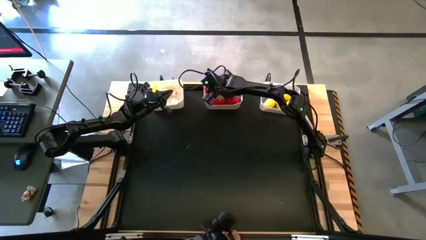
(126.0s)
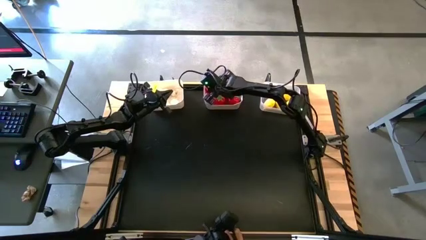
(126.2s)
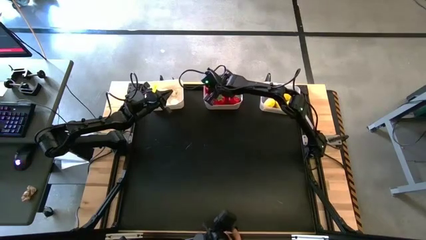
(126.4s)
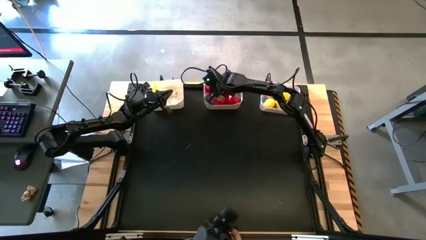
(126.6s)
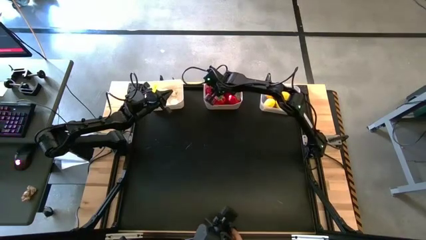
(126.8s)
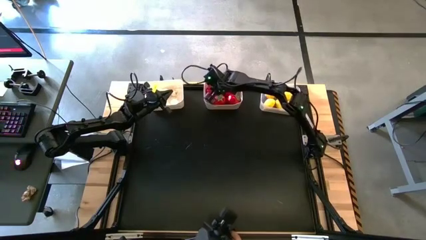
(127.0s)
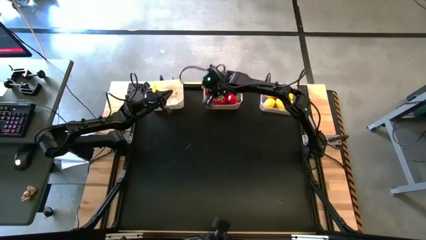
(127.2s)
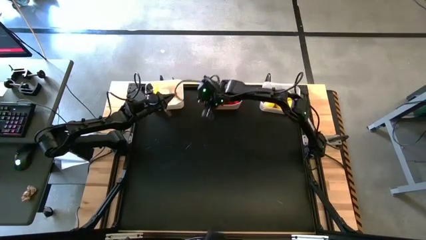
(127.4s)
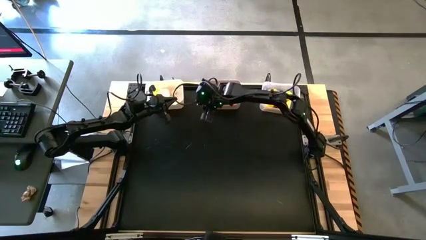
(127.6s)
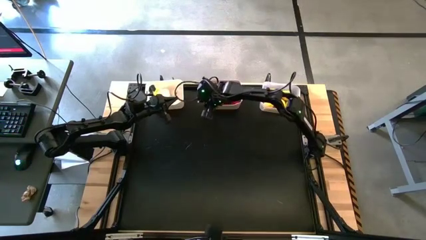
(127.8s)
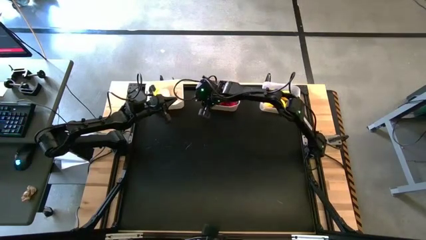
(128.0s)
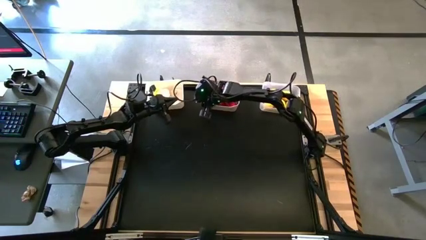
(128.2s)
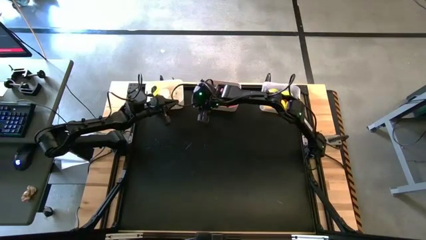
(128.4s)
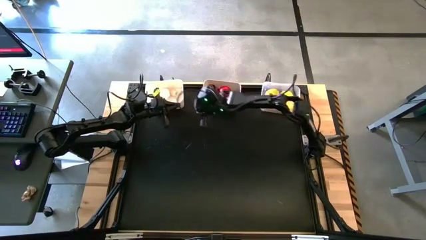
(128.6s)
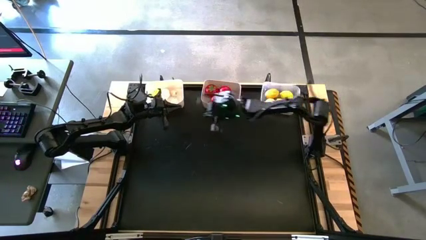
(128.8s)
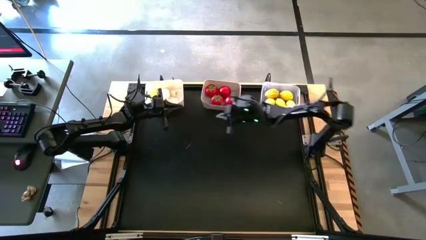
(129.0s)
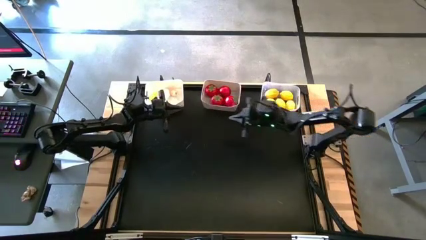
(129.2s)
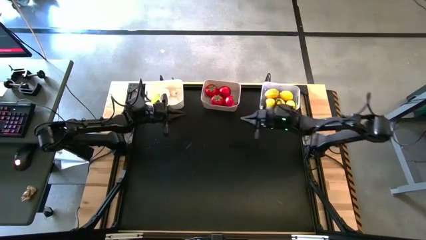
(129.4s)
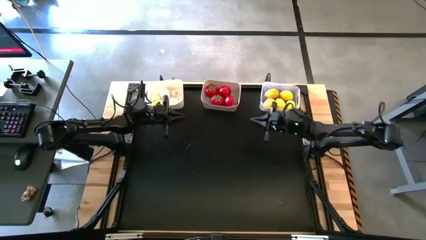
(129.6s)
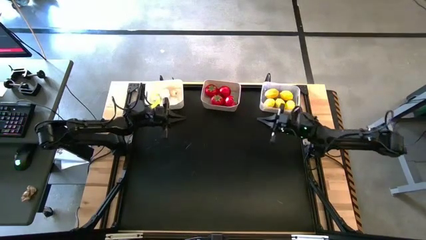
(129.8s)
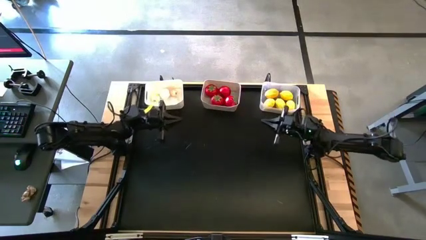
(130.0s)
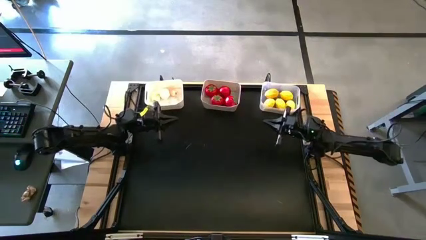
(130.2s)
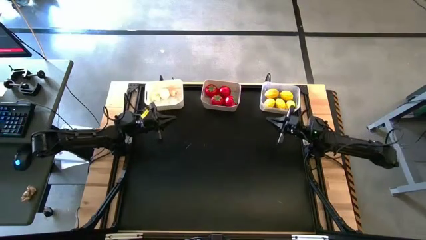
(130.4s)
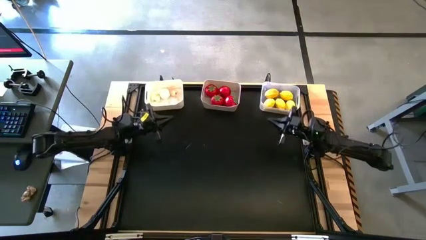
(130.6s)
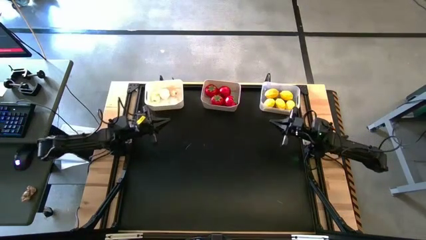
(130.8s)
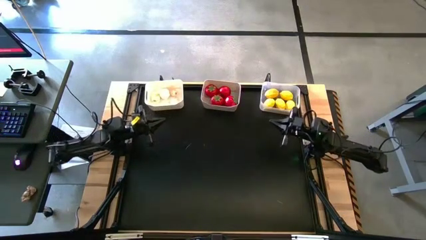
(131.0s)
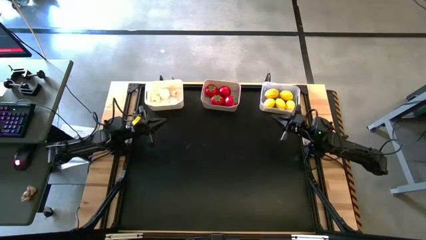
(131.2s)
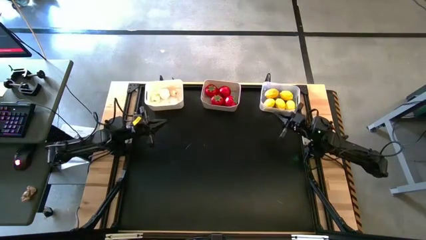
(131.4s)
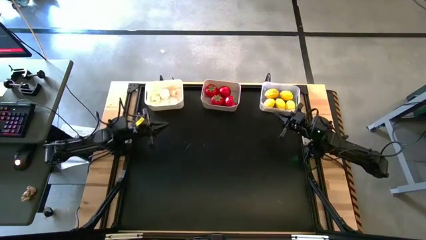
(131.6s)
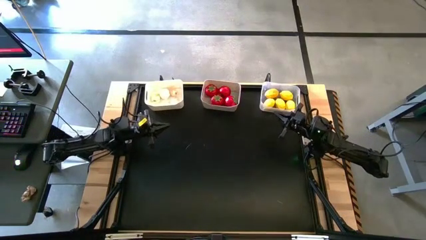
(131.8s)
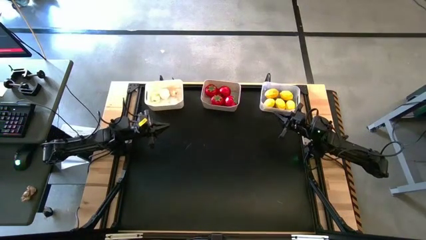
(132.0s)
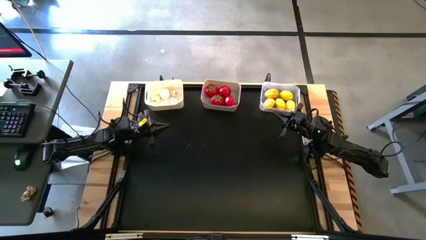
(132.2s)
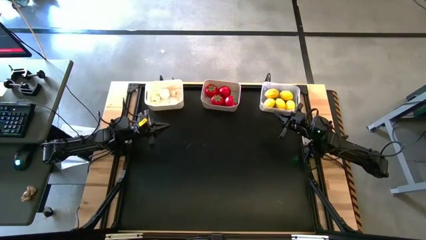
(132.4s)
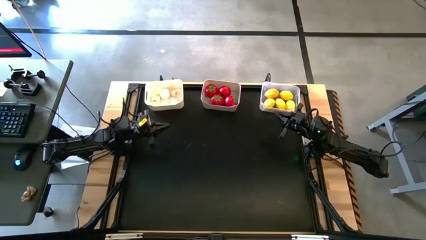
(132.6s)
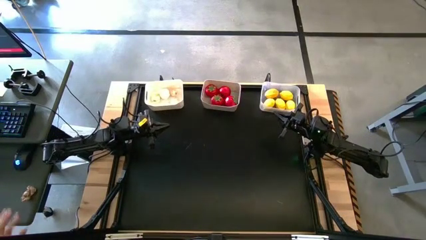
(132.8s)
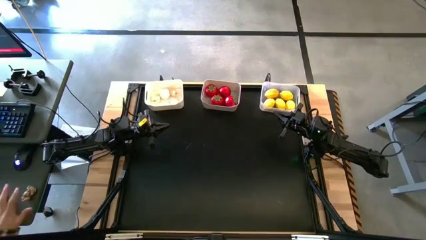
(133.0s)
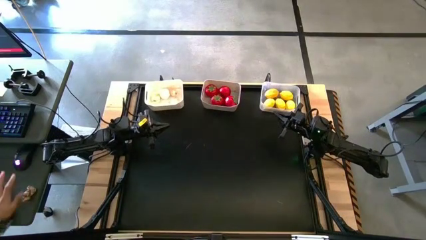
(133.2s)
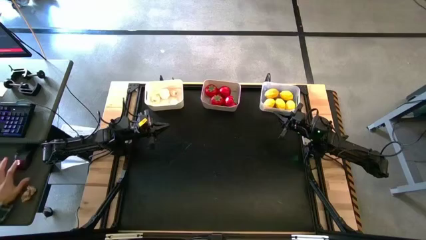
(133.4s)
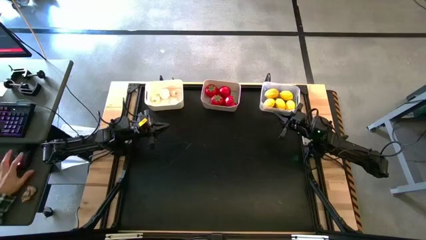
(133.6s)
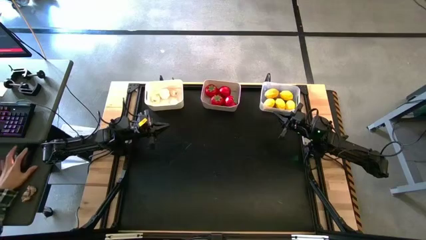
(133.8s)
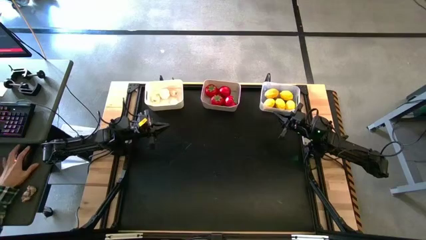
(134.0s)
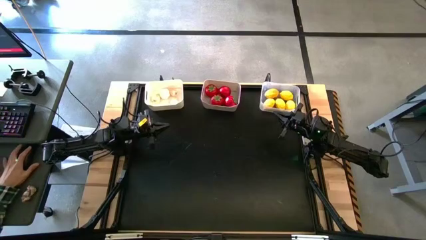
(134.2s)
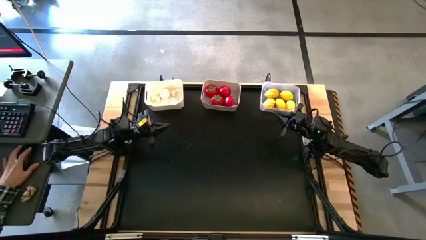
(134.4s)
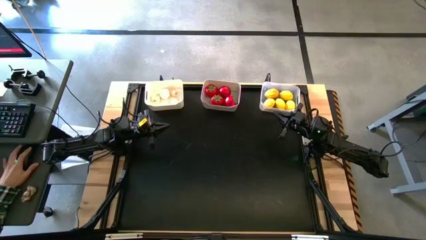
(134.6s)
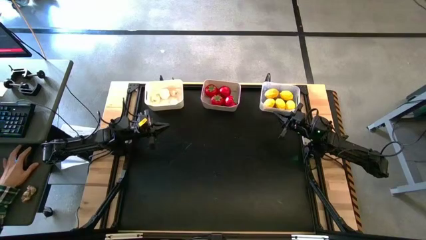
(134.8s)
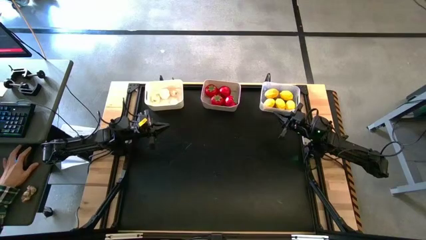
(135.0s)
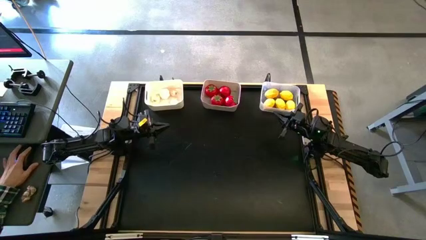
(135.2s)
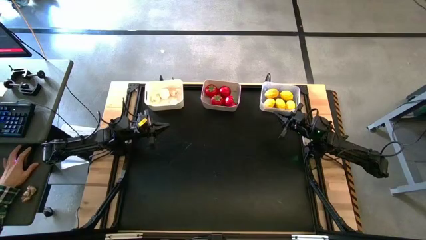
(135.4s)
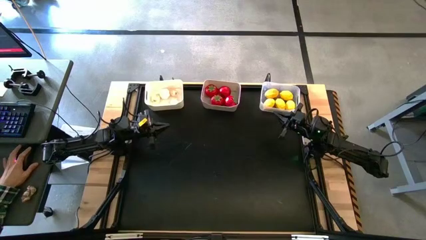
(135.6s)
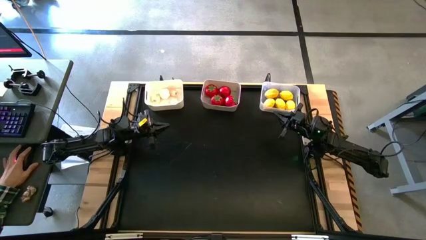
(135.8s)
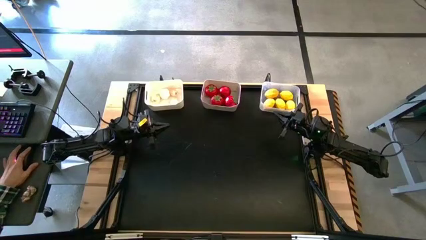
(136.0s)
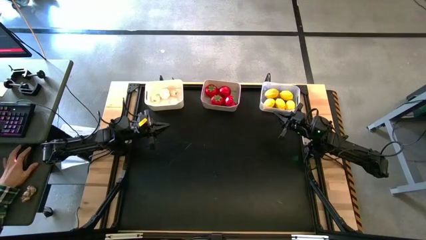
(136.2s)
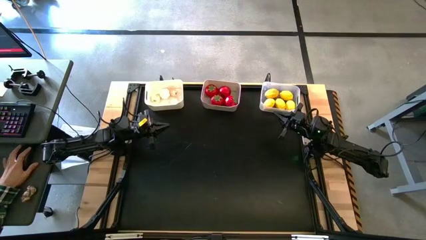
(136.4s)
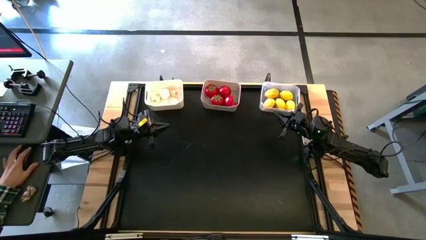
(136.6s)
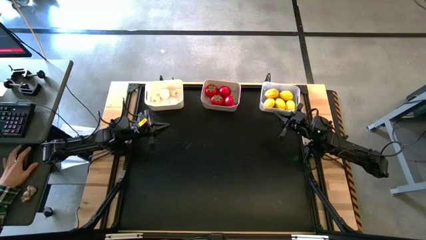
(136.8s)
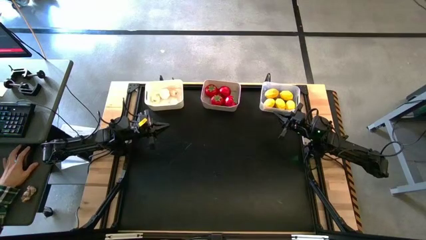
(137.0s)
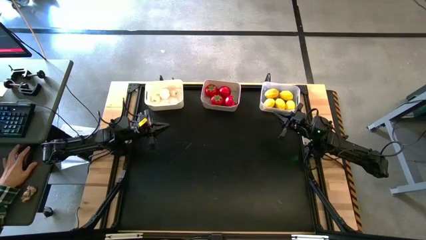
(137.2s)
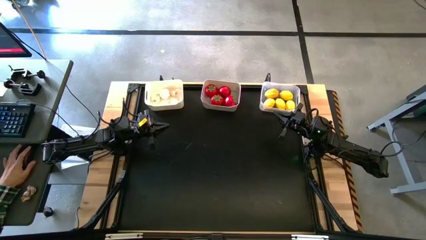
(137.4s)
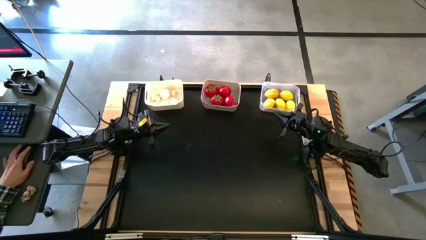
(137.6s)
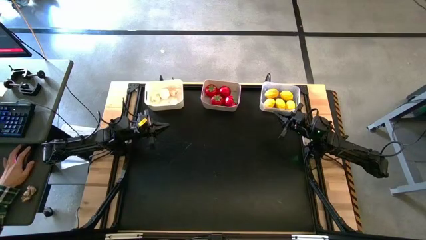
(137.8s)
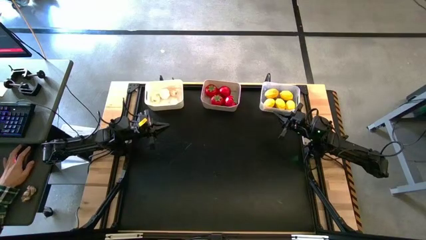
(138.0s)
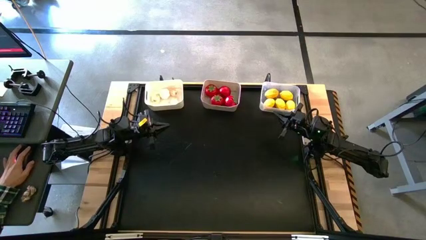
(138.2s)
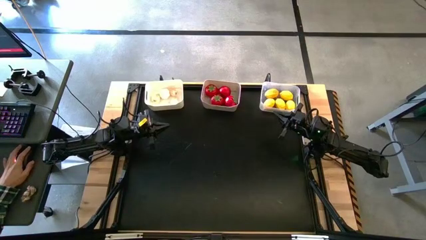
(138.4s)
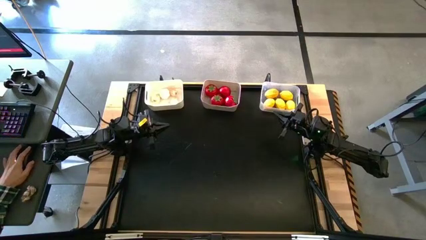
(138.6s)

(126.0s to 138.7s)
Task: Sort produce into baskets
Return to Home Position
